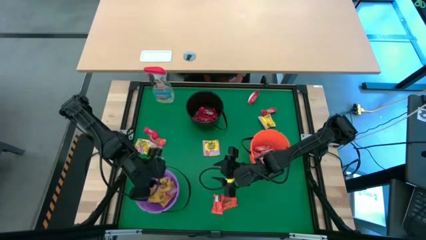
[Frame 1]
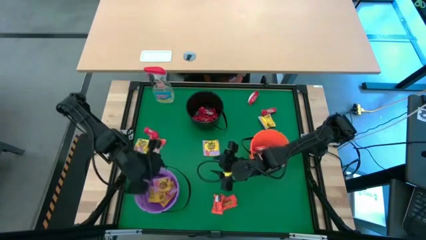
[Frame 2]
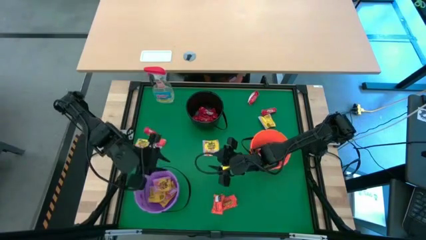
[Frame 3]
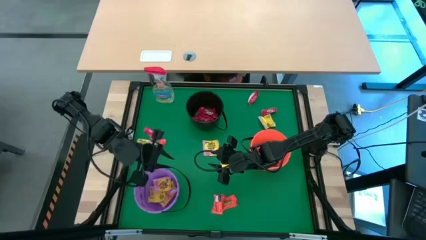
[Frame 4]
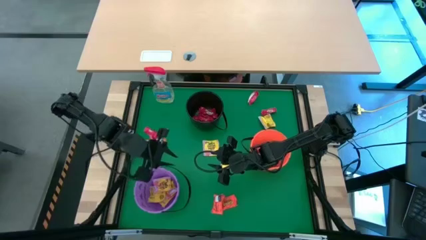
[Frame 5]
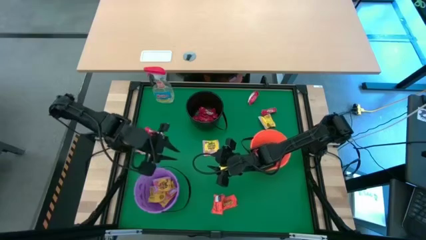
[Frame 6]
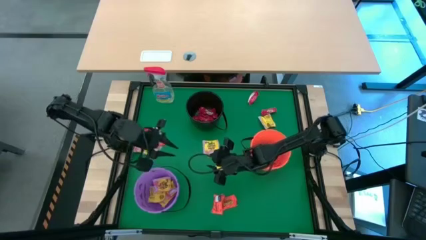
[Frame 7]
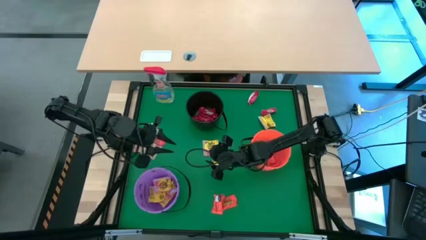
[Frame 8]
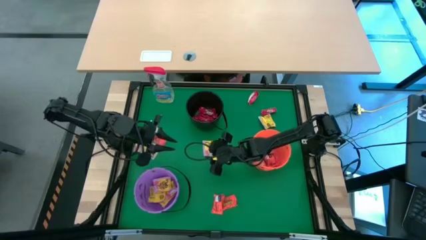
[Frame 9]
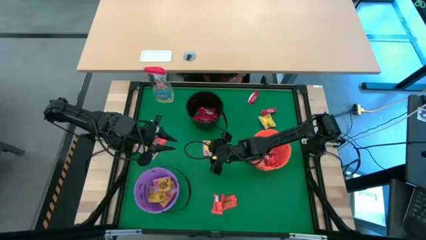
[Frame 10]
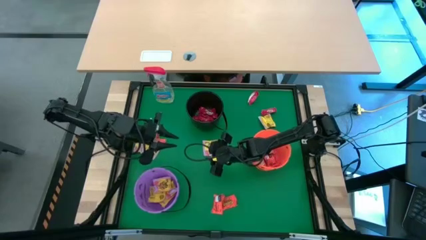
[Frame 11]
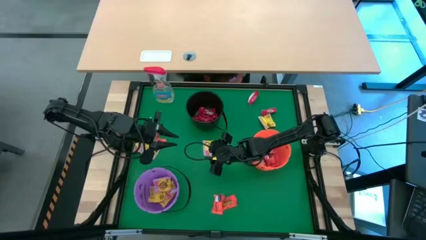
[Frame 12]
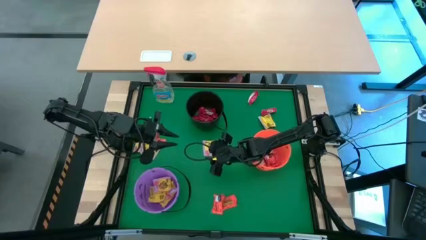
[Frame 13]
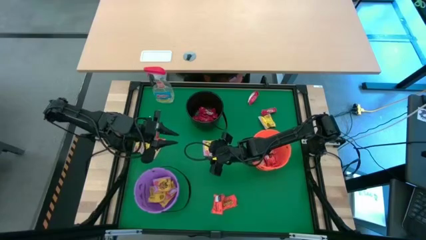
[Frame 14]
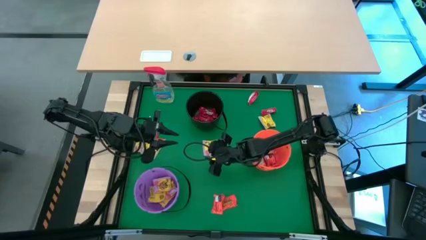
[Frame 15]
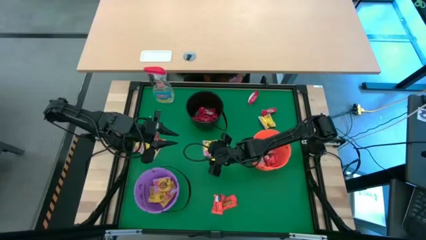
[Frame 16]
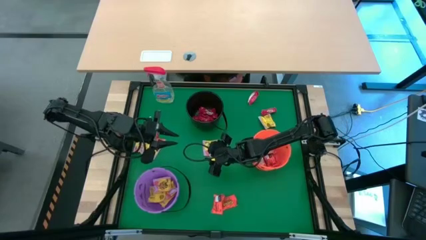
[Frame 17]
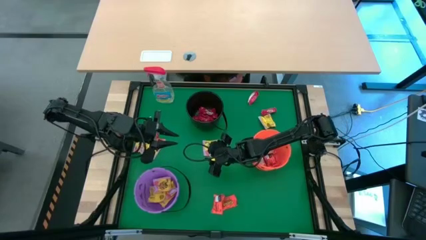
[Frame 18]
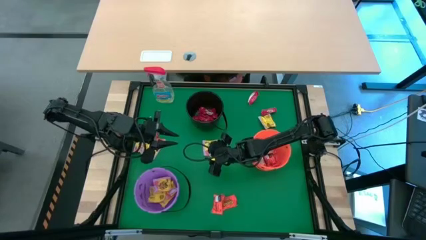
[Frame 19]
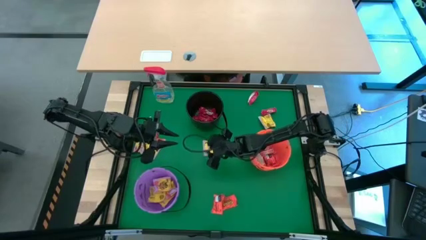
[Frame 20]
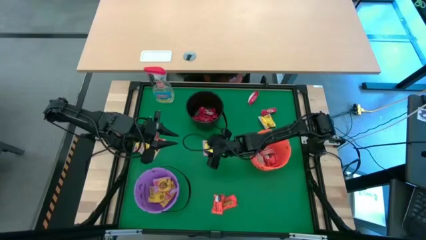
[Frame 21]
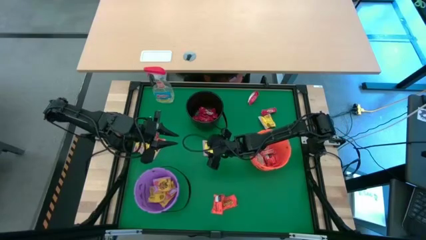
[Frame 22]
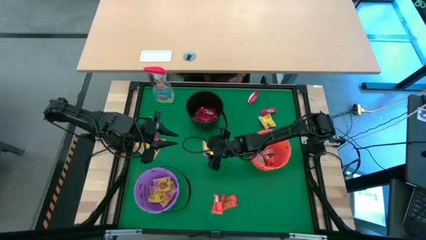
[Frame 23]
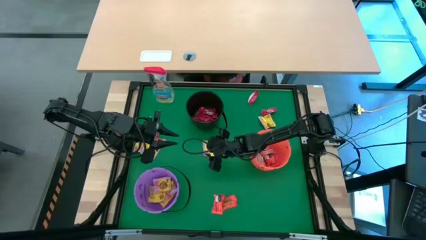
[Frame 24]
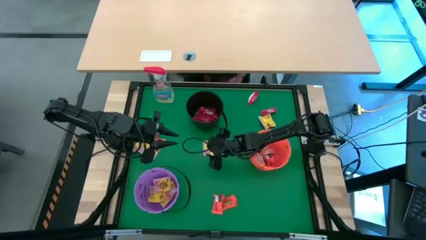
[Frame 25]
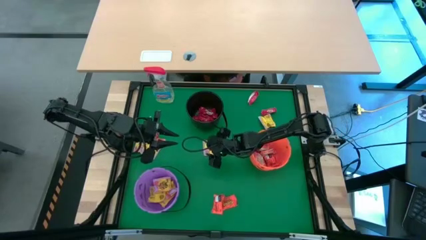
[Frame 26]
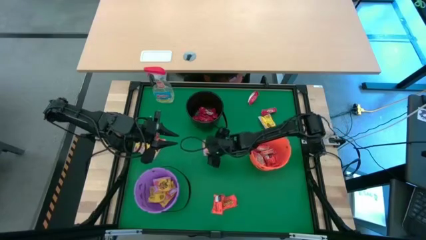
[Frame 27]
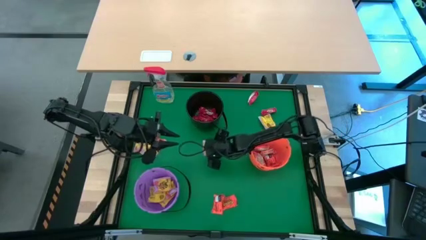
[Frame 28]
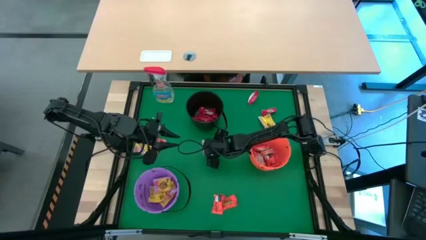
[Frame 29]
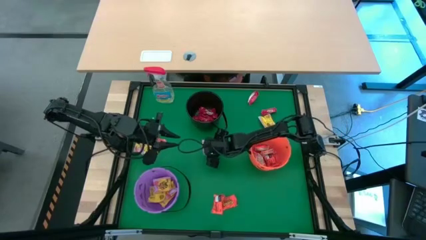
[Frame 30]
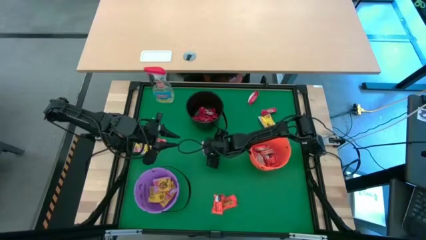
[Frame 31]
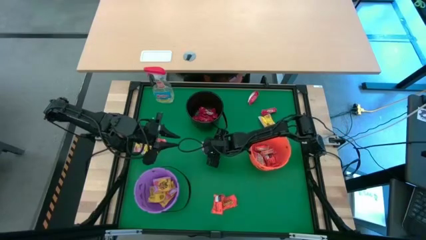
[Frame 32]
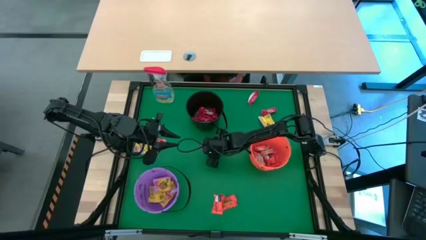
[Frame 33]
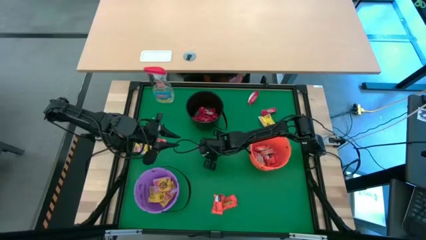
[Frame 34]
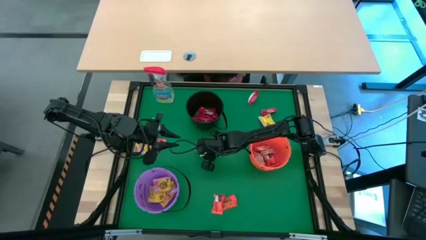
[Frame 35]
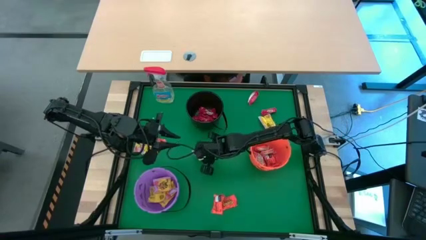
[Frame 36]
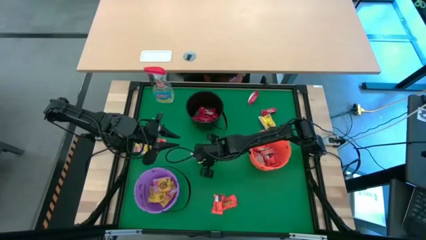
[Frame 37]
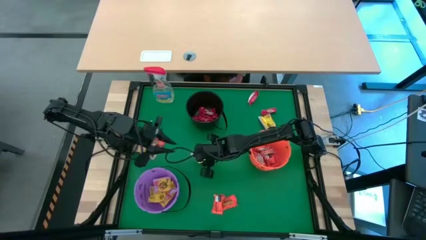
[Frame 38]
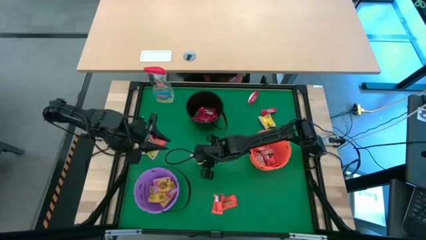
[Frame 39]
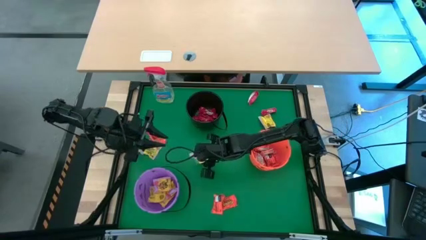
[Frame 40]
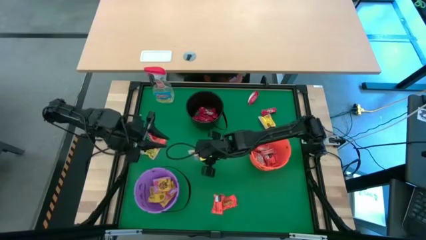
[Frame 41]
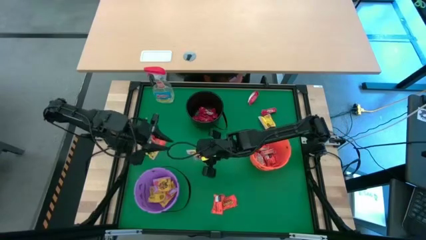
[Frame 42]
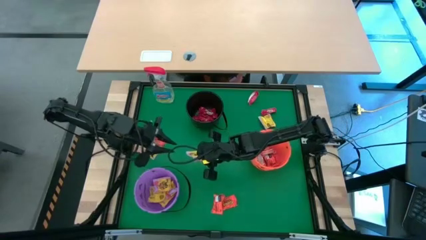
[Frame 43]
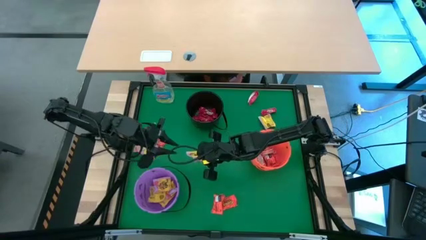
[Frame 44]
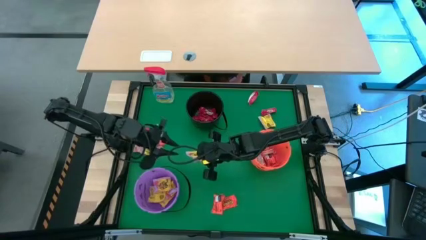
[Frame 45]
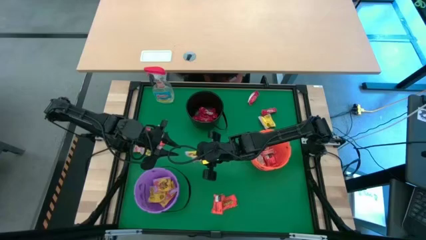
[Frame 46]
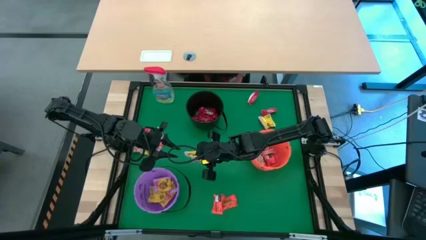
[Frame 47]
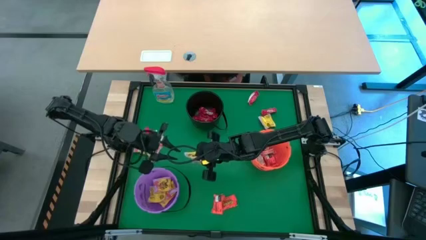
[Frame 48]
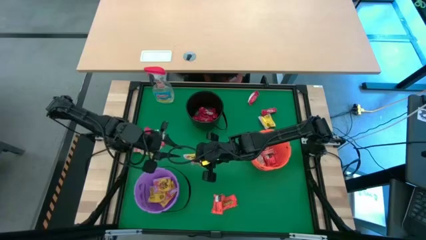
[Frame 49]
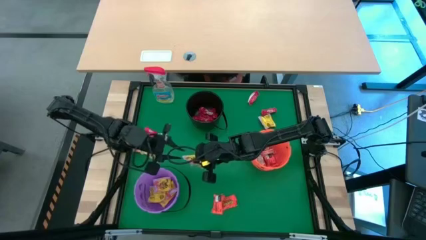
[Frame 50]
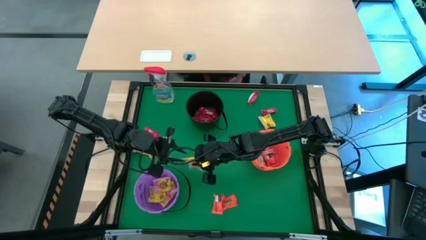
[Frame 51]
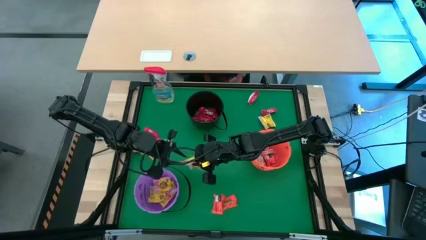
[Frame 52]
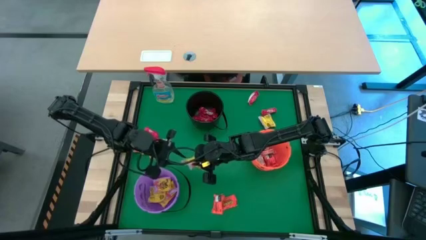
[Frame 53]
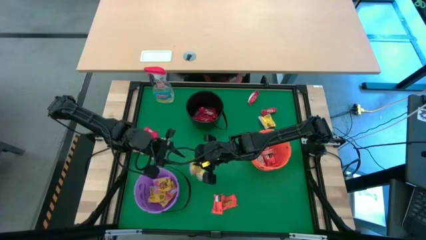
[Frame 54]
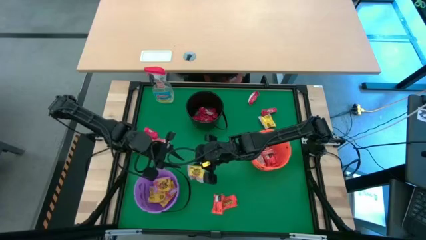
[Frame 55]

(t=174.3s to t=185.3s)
Task: Sort candy
Put the yellow candy into the violet bucket

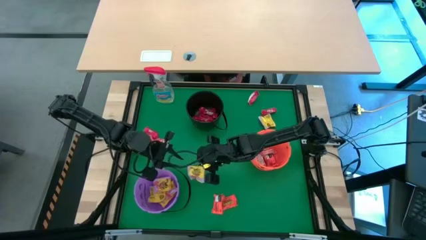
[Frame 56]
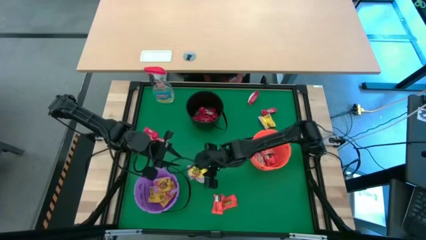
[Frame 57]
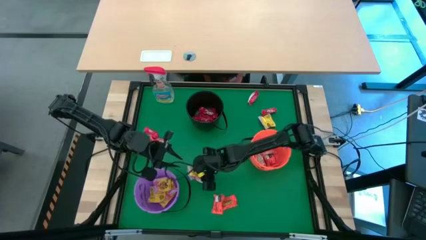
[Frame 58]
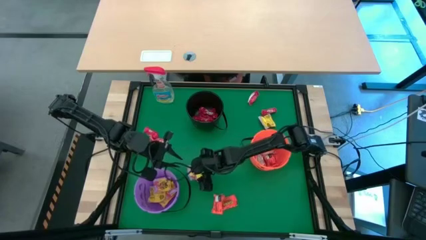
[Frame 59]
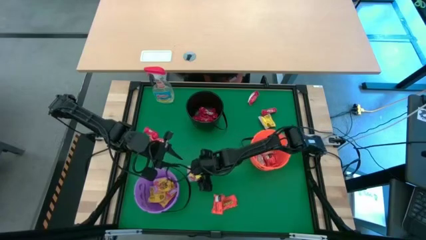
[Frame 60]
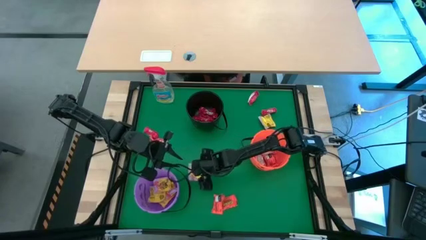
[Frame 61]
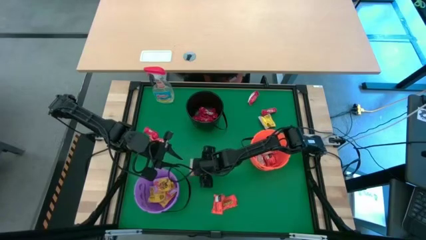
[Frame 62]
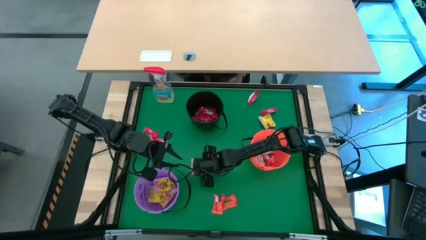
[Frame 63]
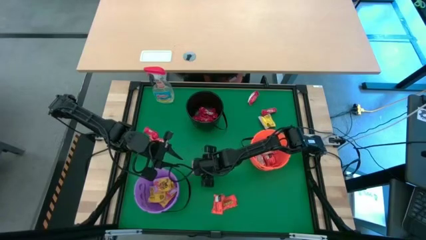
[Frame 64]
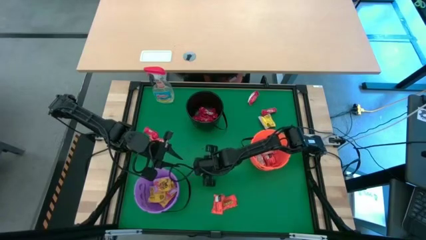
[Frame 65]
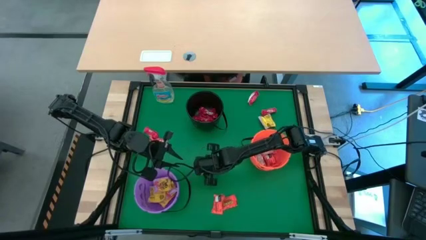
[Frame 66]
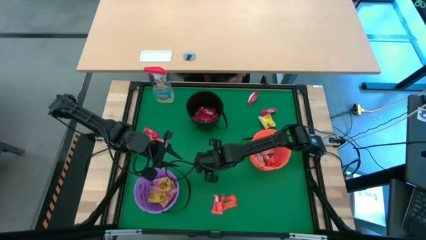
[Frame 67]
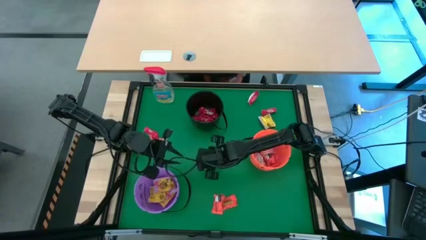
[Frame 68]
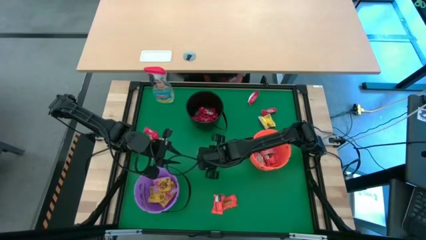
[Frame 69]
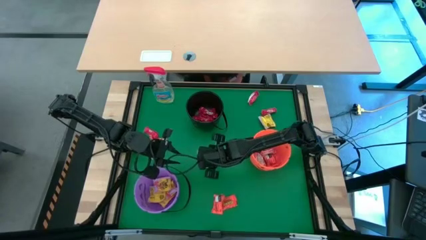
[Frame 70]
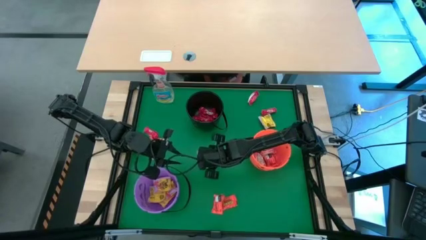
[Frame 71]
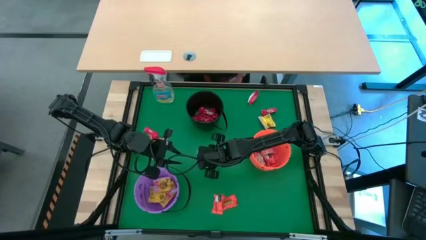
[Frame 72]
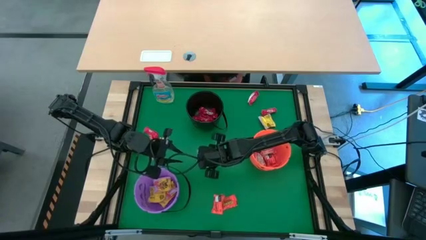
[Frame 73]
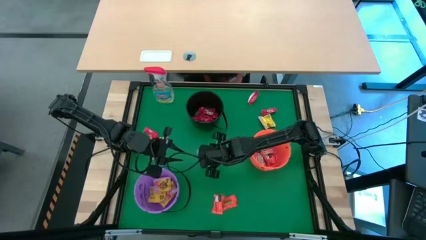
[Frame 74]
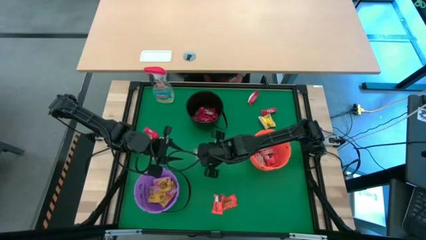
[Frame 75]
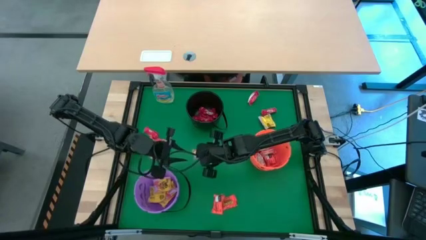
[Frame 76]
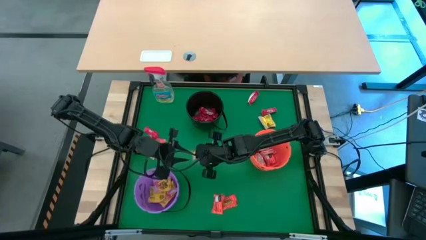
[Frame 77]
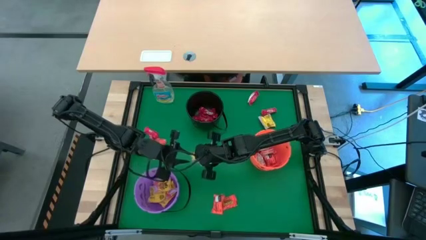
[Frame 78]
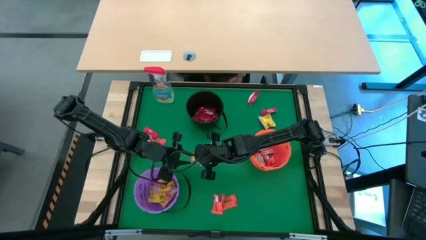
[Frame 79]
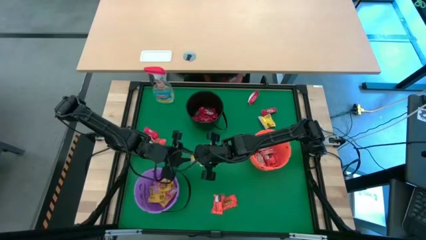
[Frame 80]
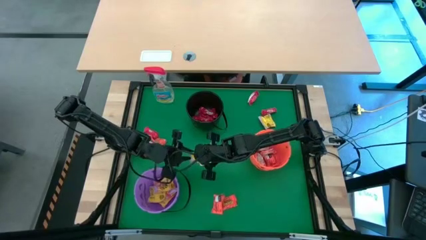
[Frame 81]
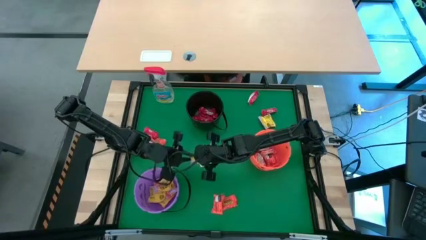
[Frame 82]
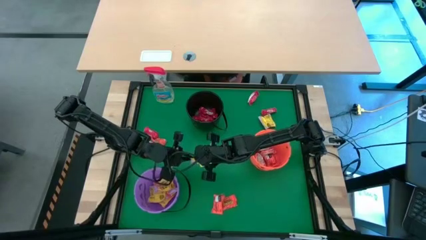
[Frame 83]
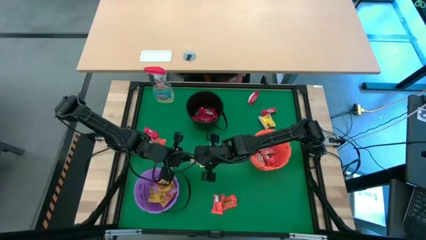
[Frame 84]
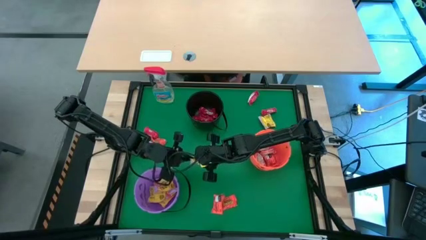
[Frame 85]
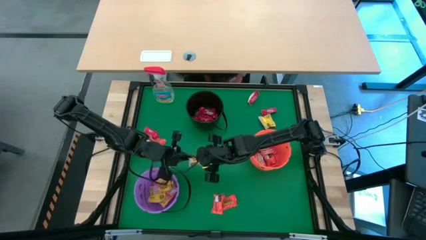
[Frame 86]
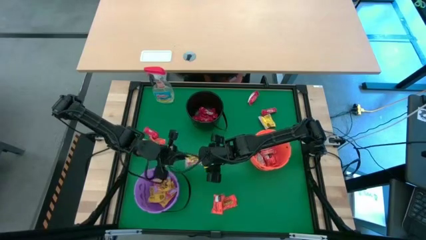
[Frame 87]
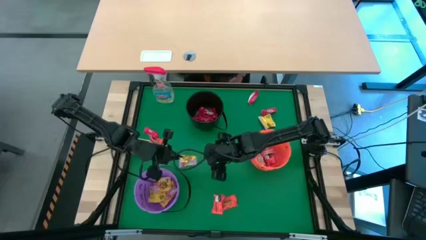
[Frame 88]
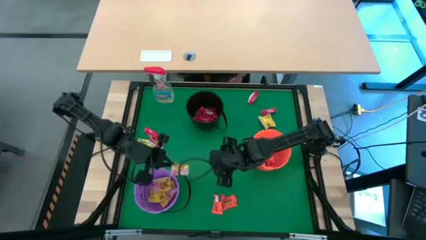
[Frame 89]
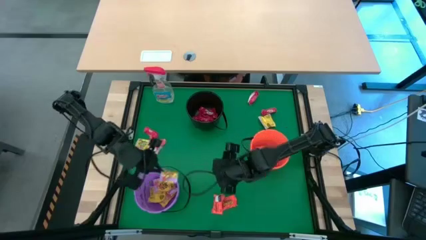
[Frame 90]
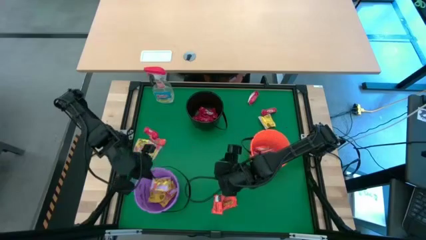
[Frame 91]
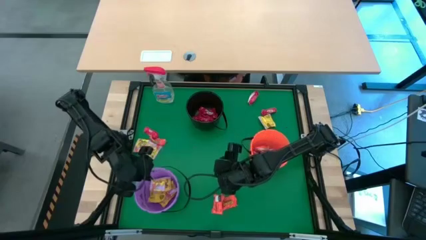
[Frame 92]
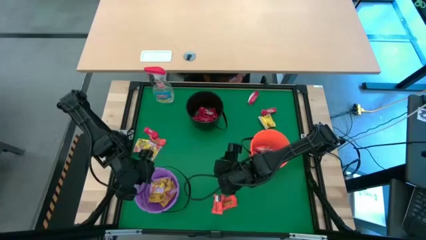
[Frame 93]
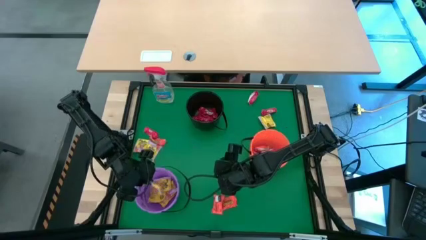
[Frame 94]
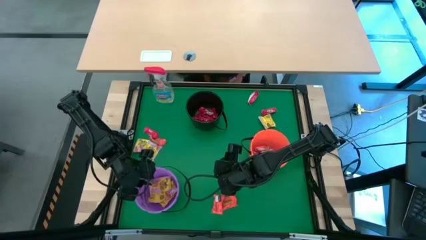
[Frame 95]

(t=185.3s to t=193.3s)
Put the yellow candy into the violet bucket
